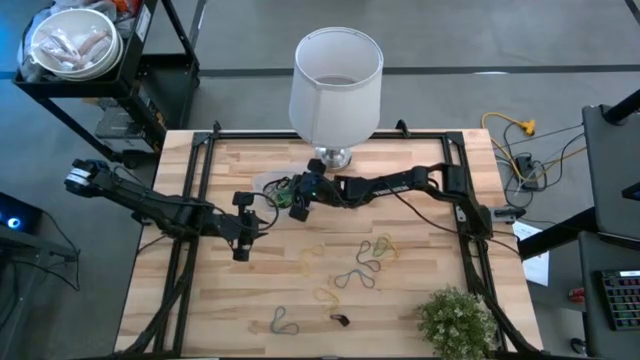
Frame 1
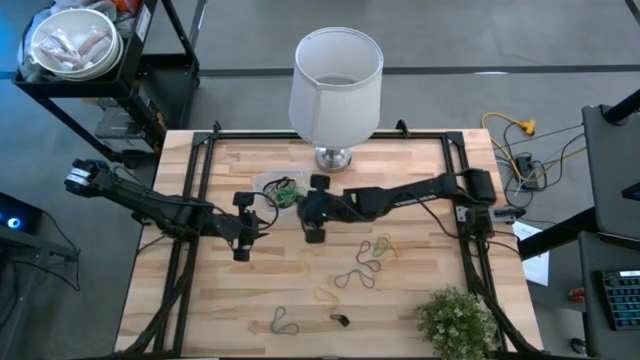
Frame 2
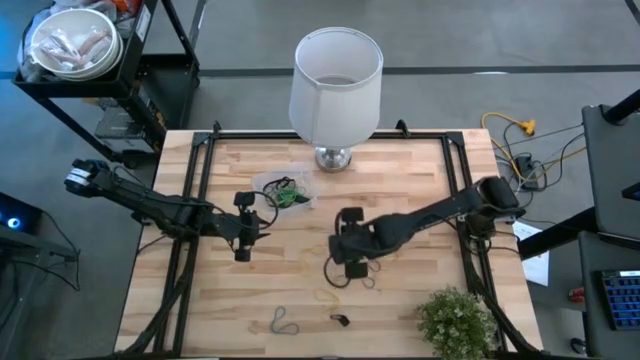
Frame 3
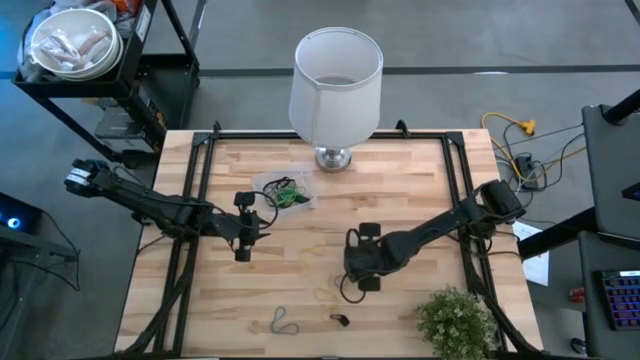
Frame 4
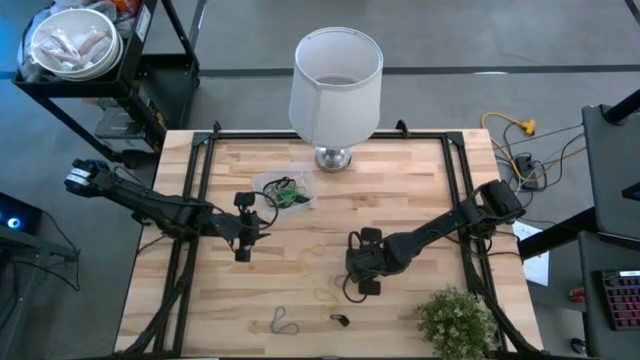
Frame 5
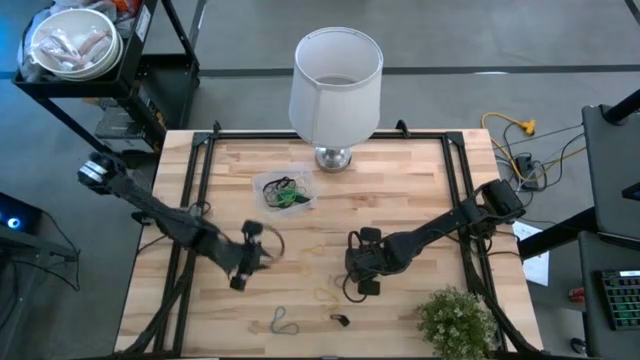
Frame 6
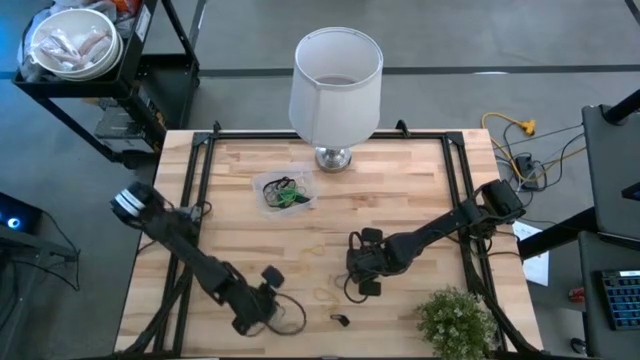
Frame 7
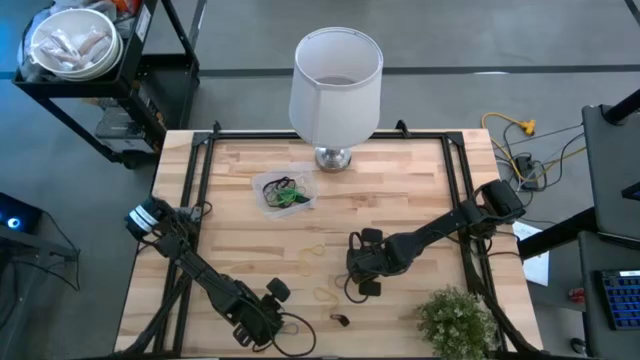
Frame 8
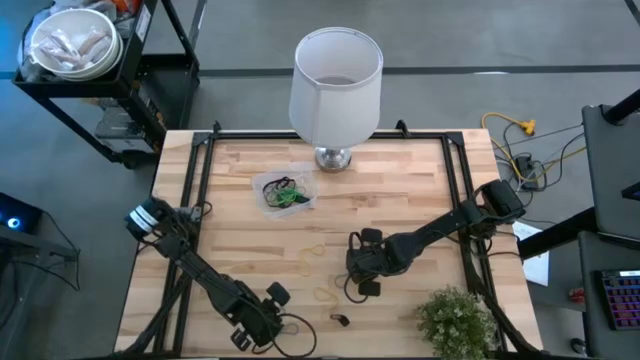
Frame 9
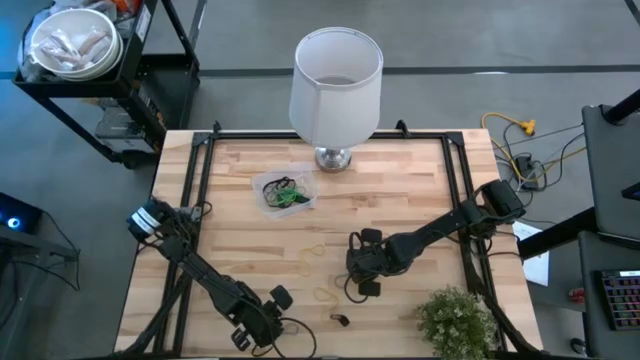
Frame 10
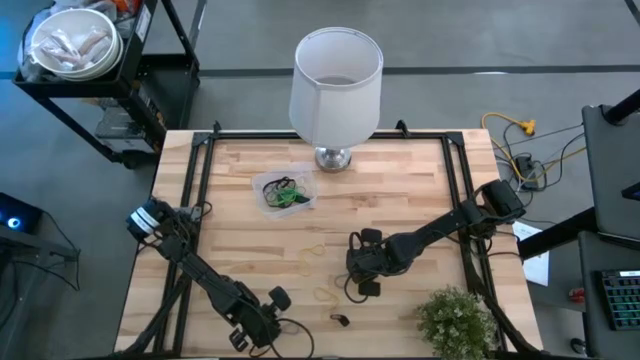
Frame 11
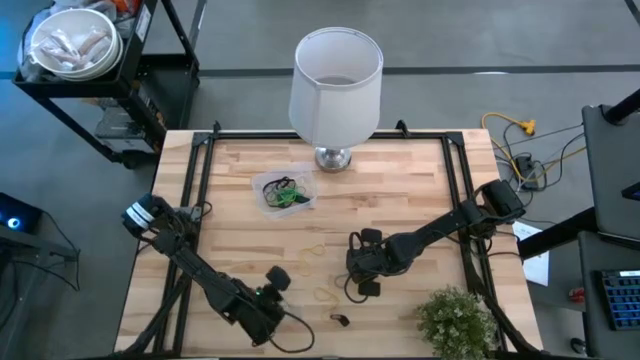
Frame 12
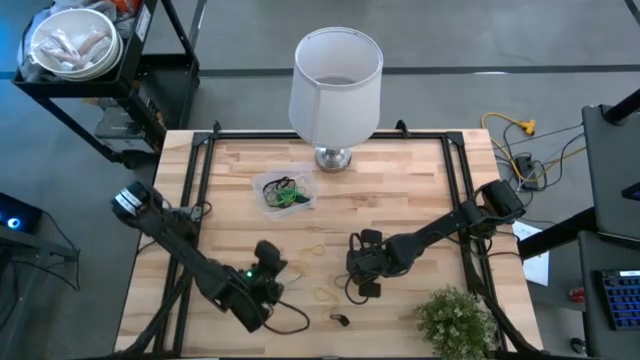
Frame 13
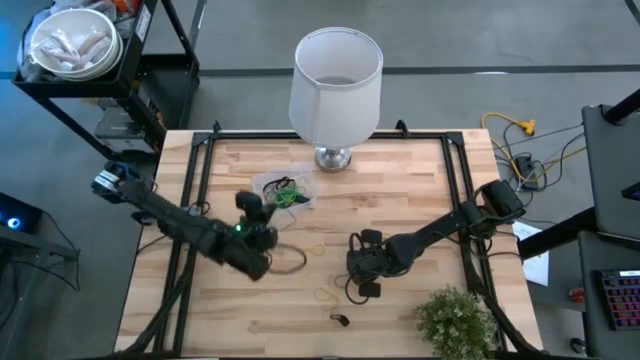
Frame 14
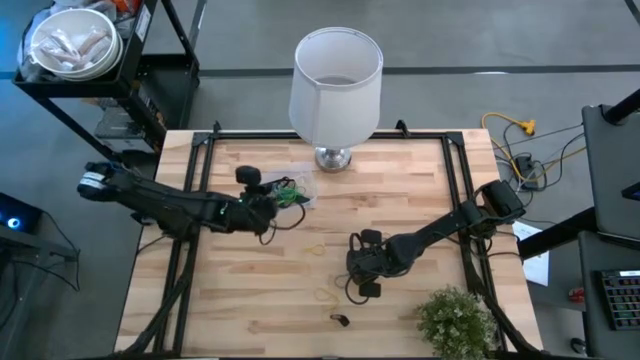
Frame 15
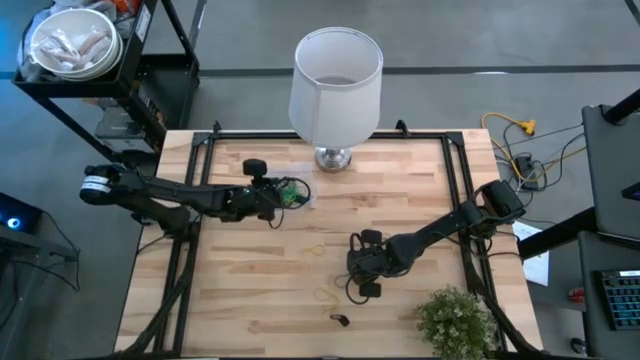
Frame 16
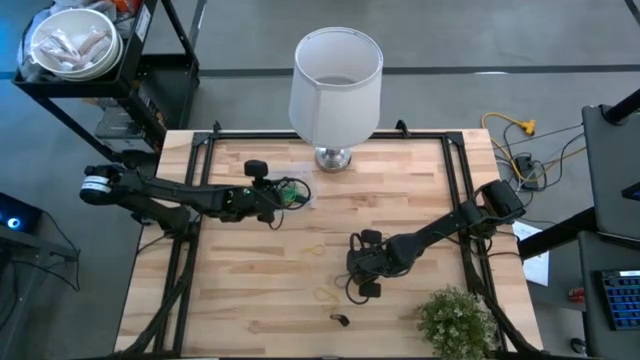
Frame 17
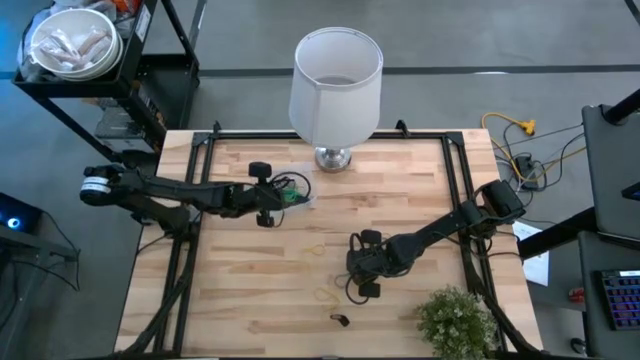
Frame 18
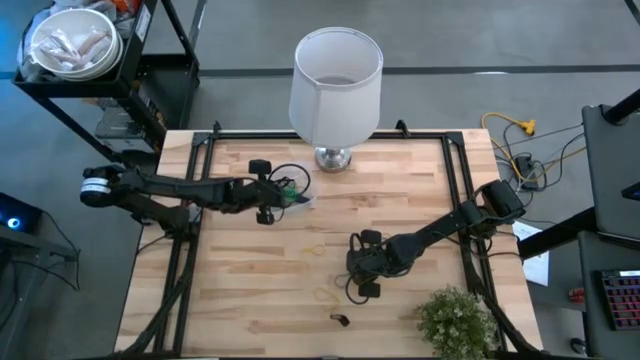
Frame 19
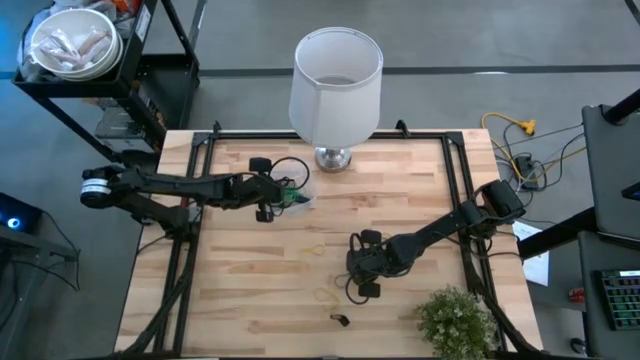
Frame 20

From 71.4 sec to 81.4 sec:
Task: Pick and place rubber bands into bin
Put the blue rubber band into the transparent bin

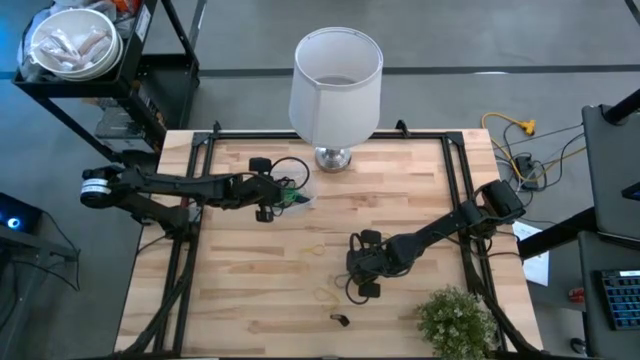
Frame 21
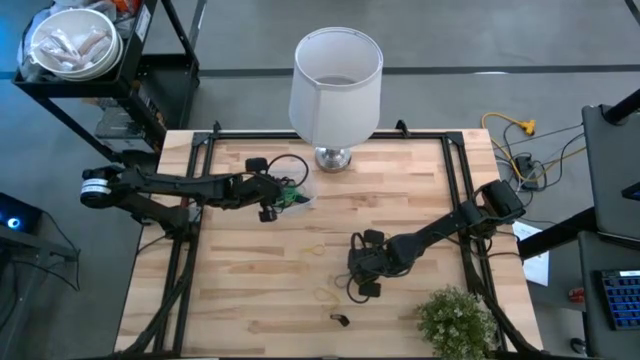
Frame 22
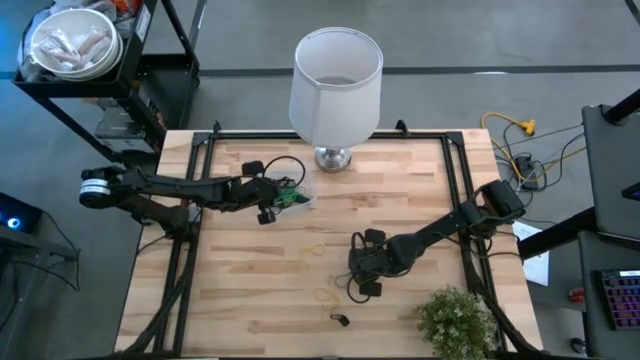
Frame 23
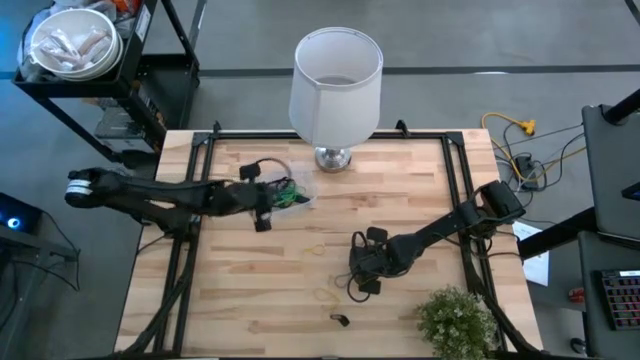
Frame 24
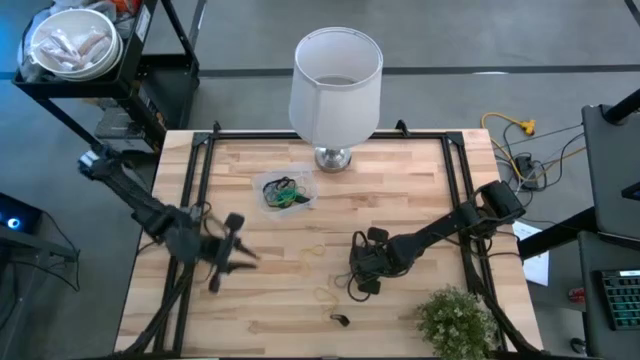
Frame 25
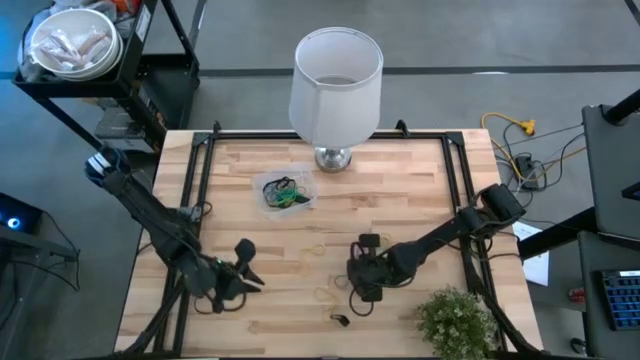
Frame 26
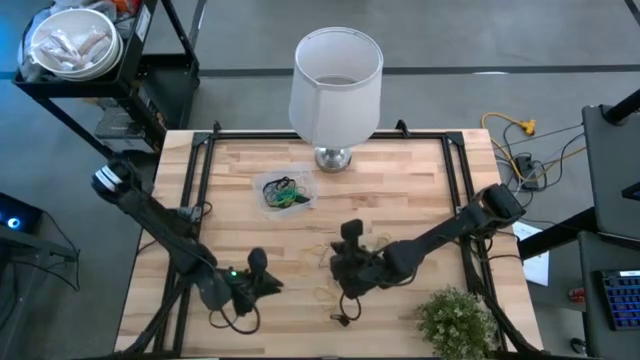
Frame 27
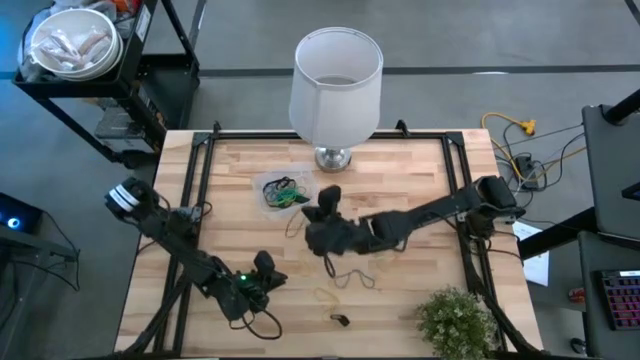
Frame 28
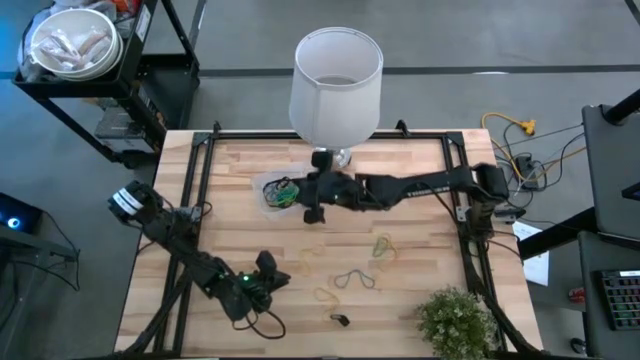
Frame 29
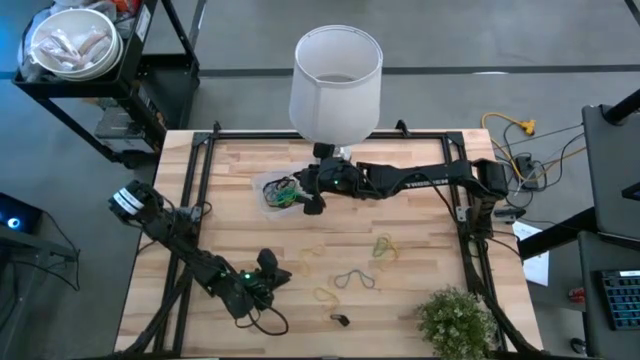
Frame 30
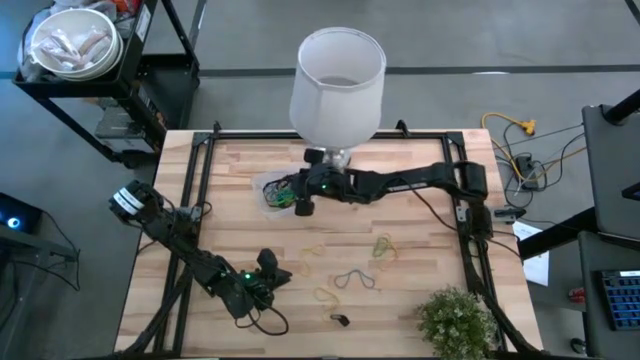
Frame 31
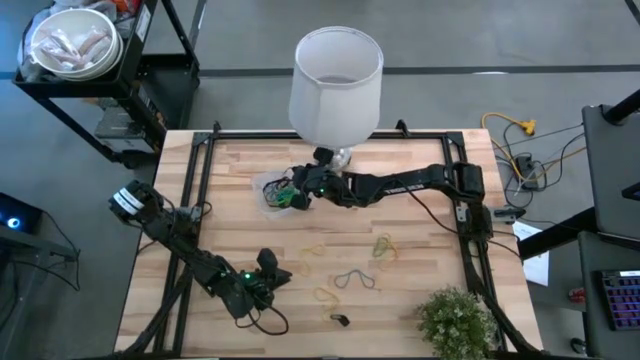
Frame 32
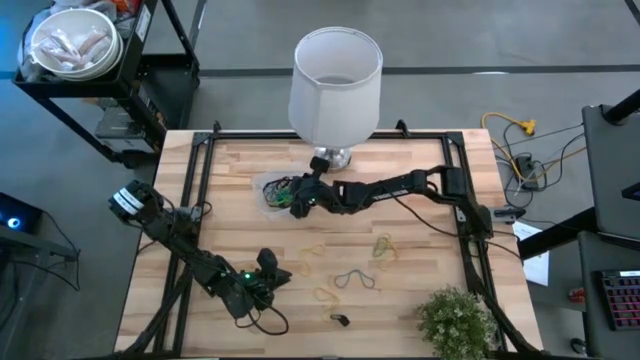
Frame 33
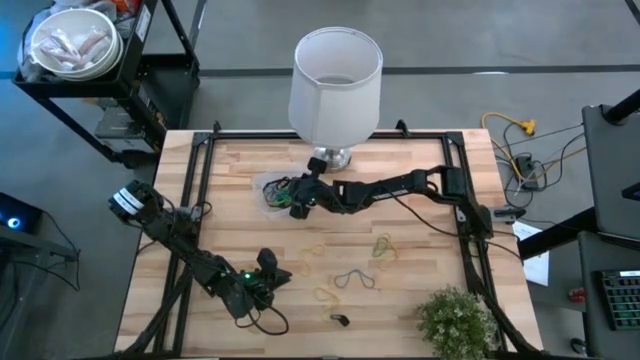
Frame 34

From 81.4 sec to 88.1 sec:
Put the purple rubber band into the transparent bin

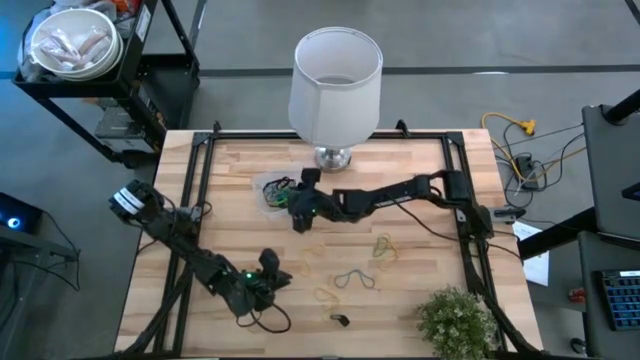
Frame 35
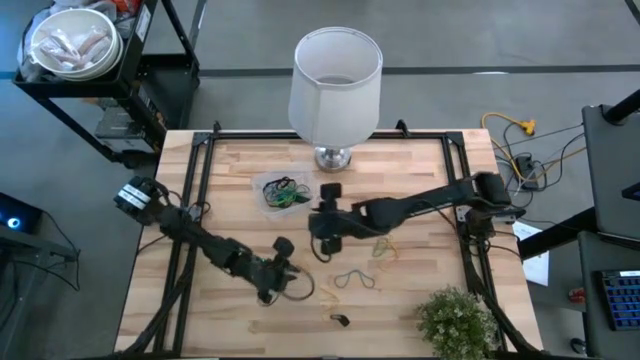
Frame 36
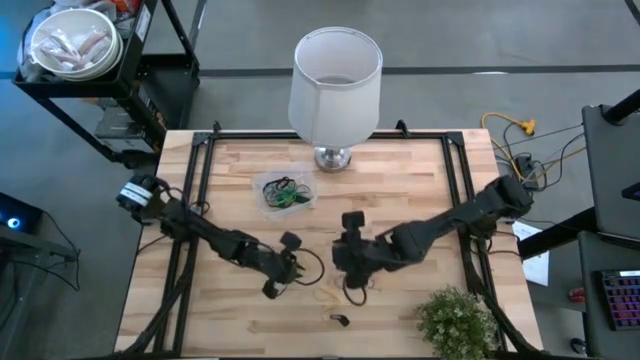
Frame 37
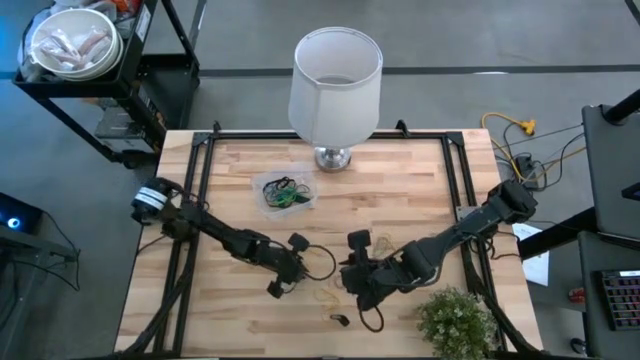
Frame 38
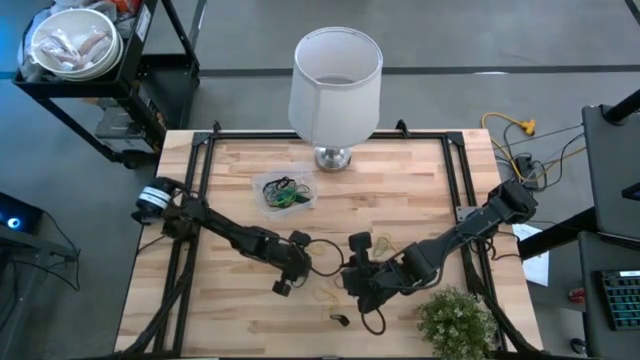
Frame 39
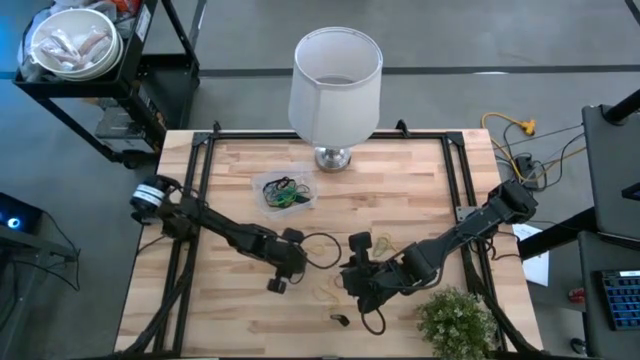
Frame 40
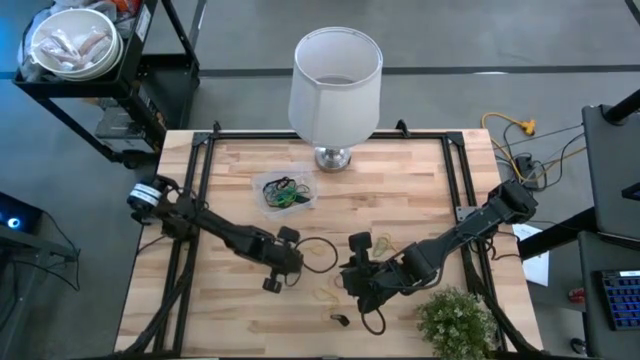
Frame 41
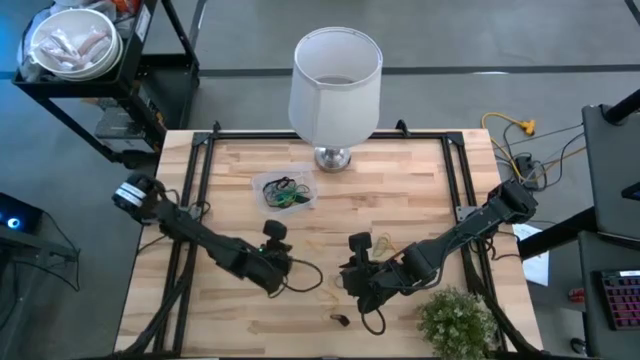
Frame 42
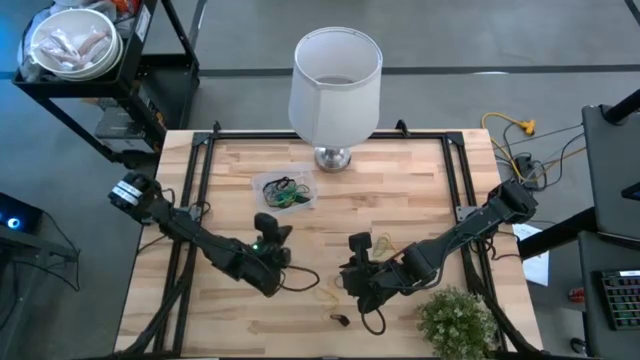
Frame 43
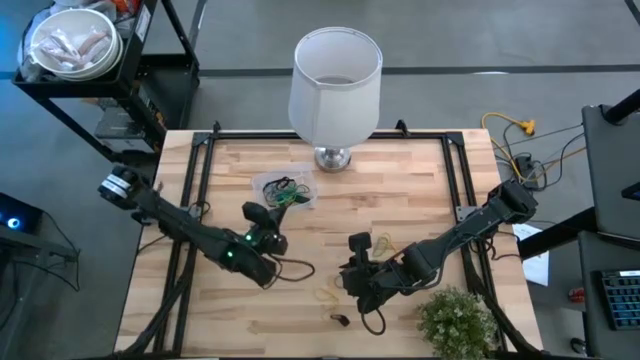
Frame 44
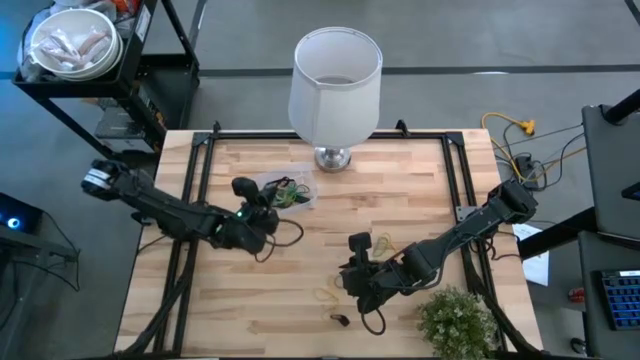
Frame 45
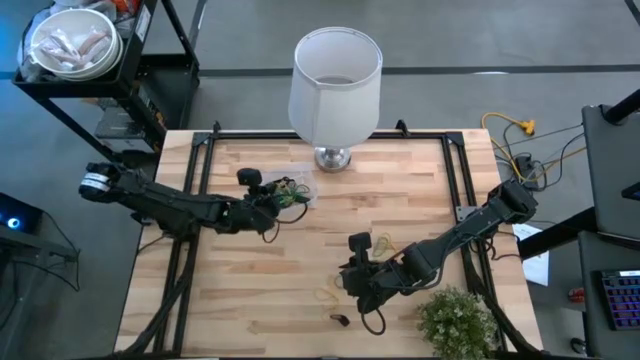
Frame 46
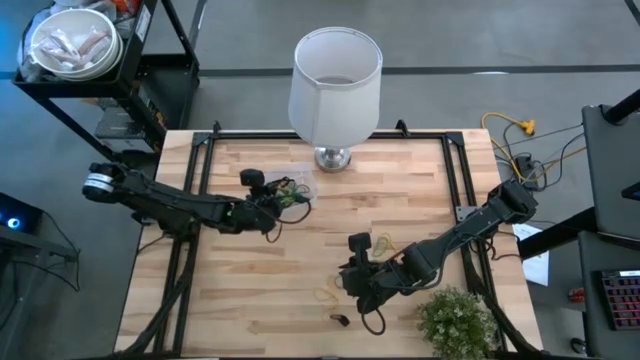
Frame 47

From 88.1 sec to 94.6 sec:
Put the yellow rubber band into the transparent bin
